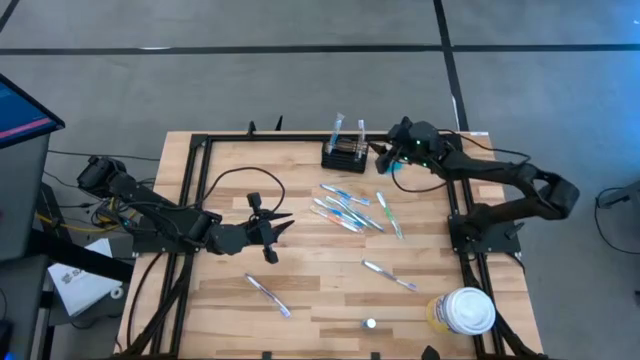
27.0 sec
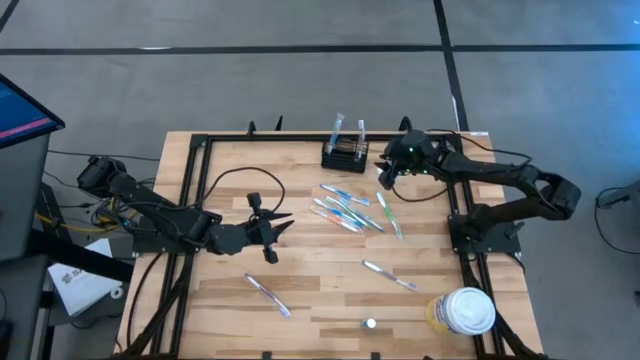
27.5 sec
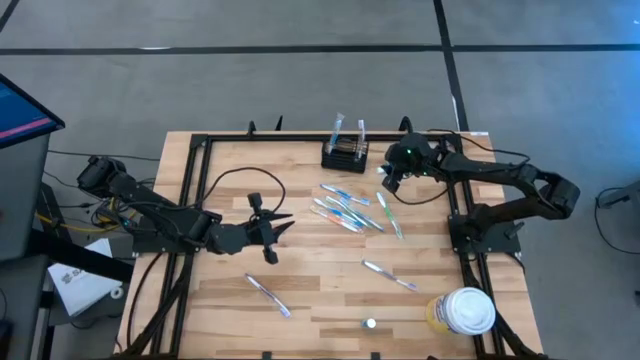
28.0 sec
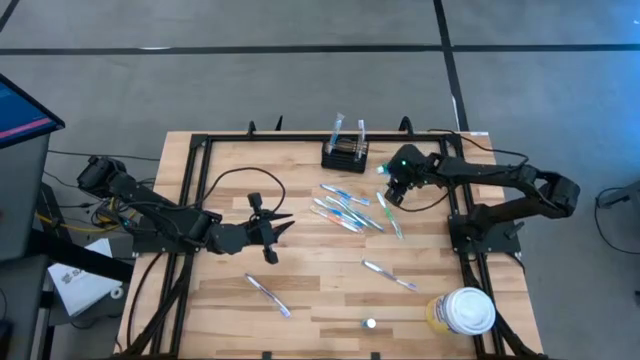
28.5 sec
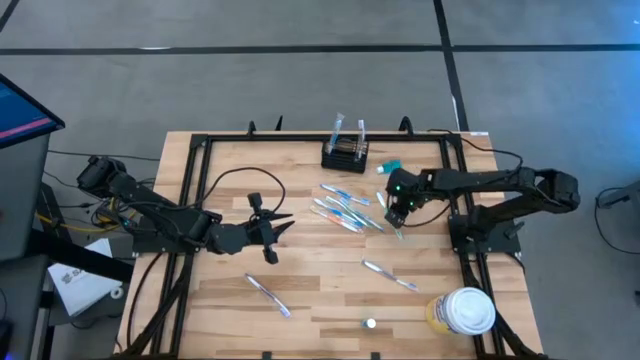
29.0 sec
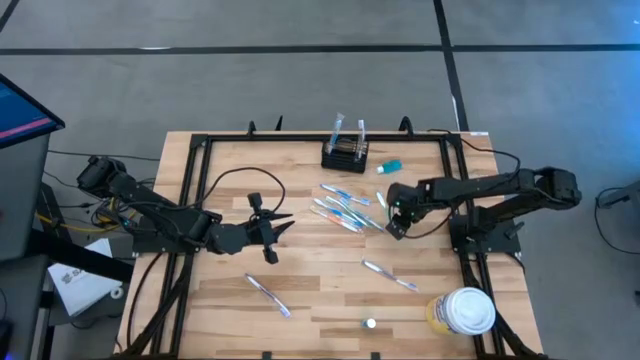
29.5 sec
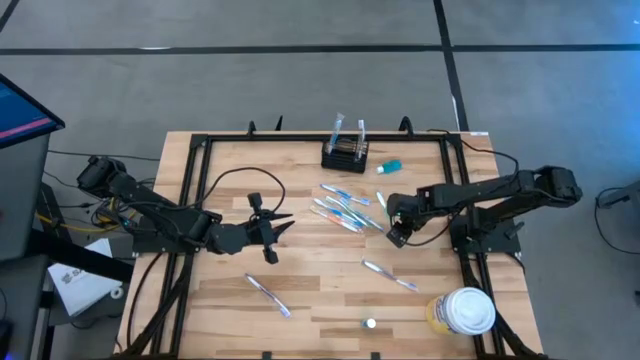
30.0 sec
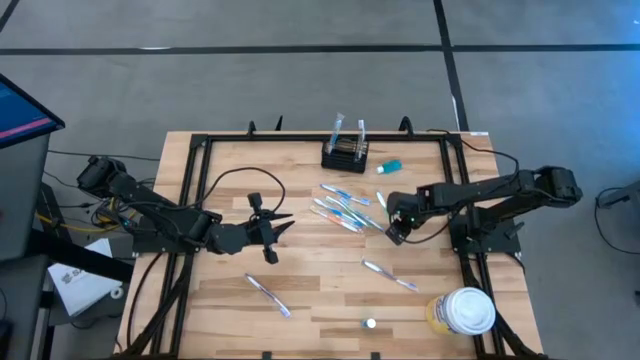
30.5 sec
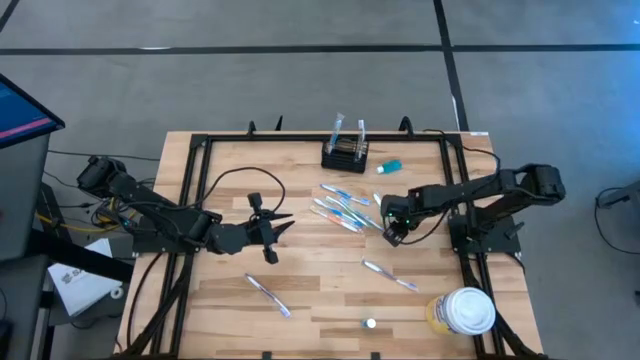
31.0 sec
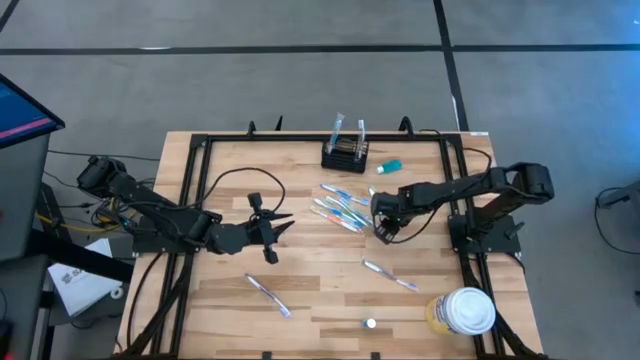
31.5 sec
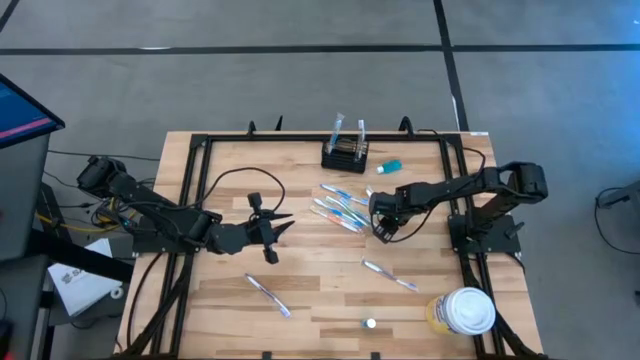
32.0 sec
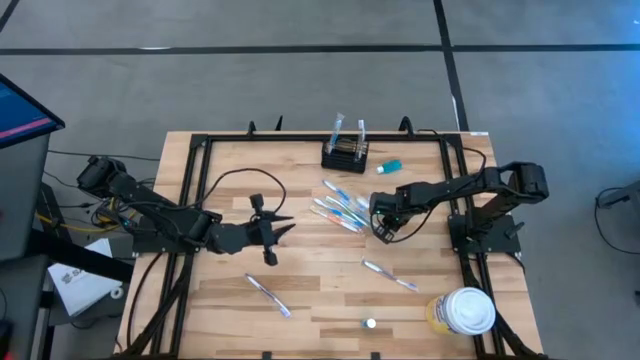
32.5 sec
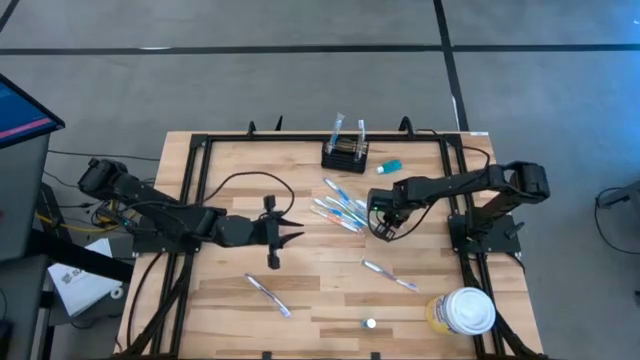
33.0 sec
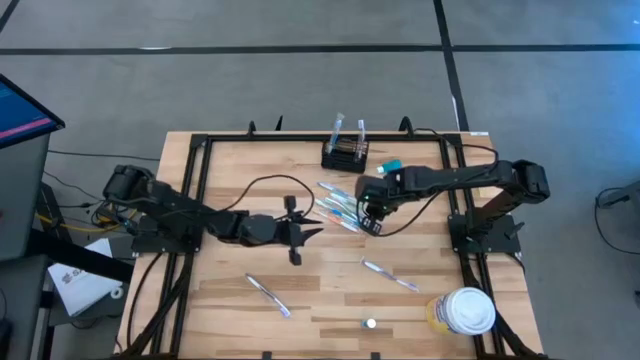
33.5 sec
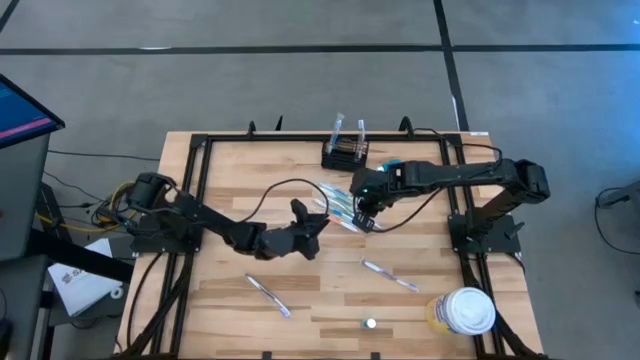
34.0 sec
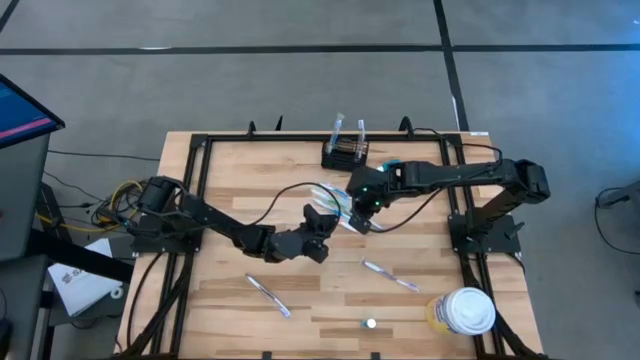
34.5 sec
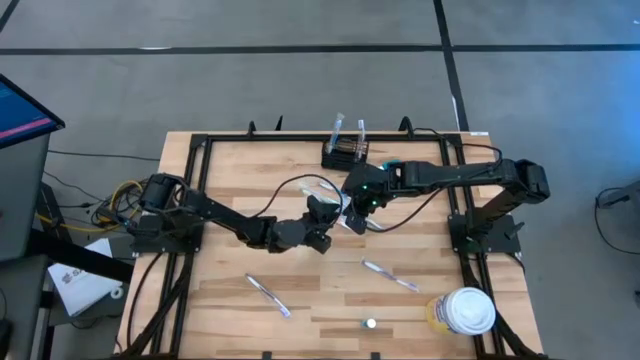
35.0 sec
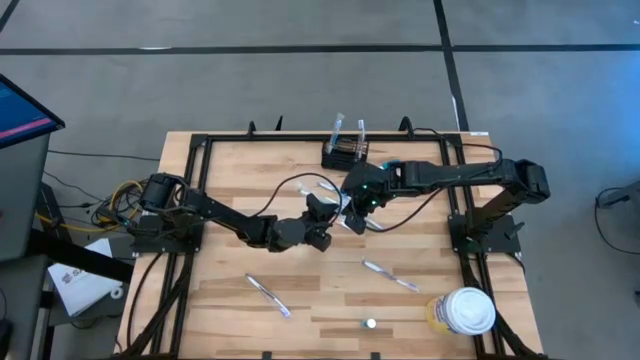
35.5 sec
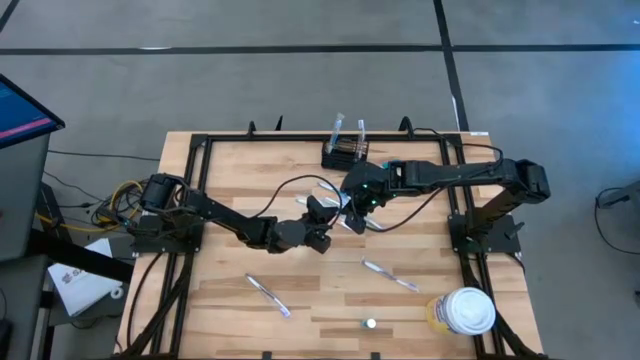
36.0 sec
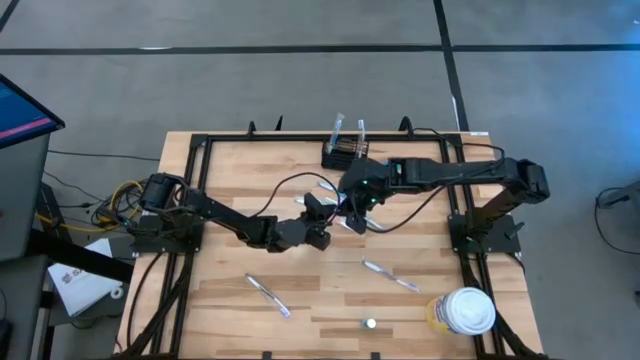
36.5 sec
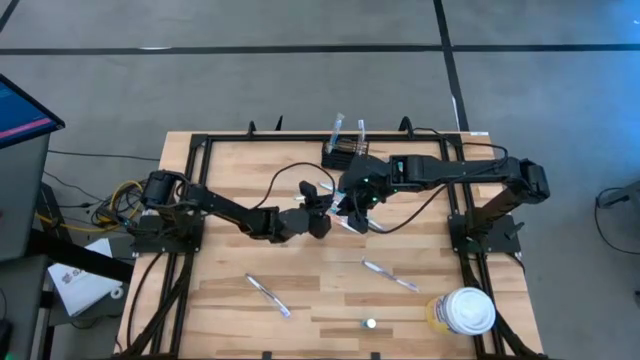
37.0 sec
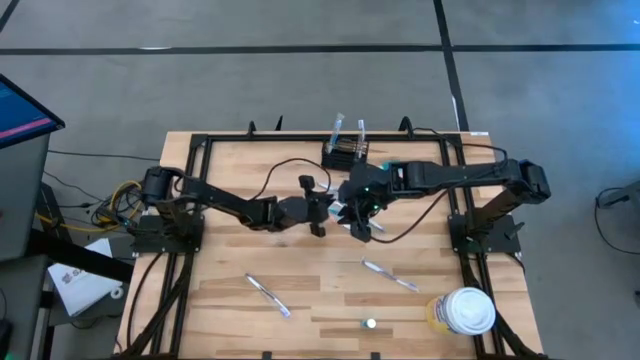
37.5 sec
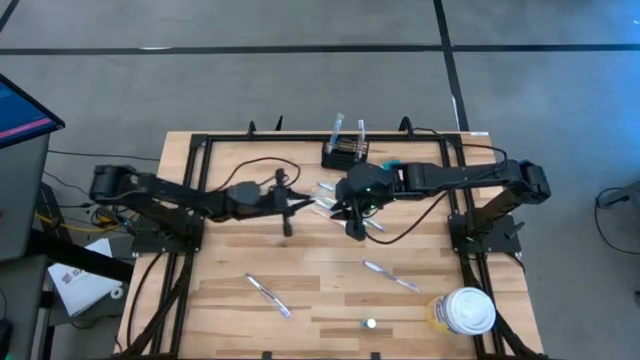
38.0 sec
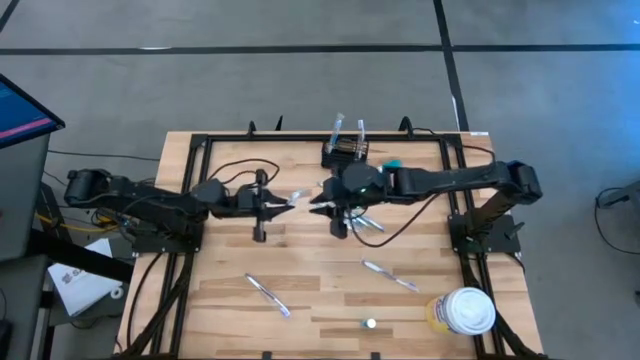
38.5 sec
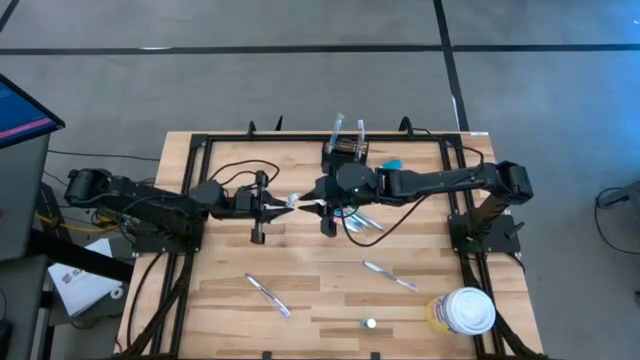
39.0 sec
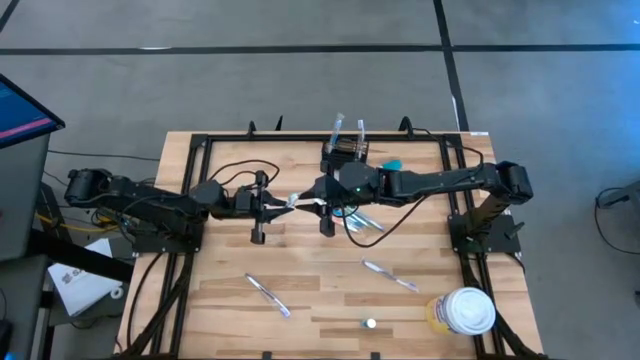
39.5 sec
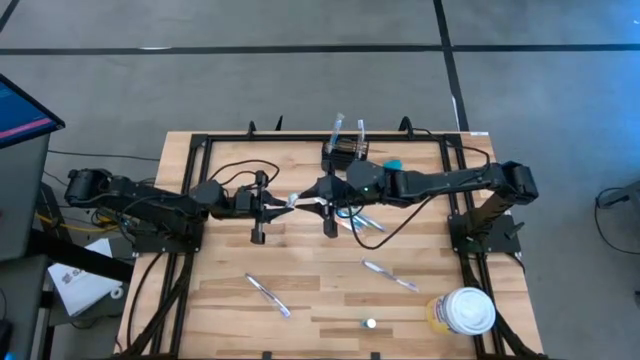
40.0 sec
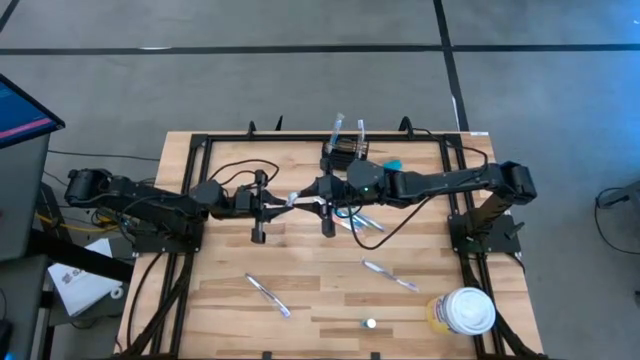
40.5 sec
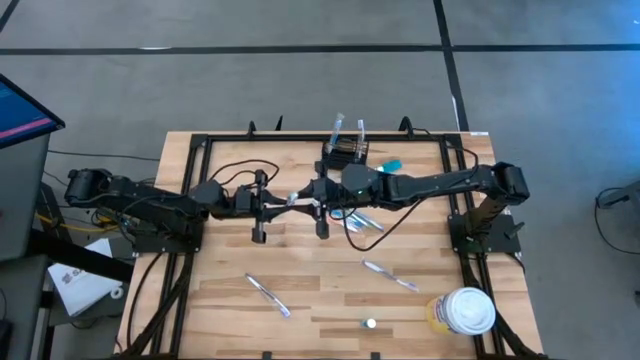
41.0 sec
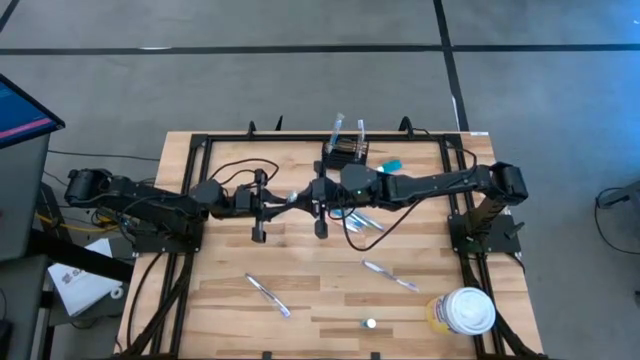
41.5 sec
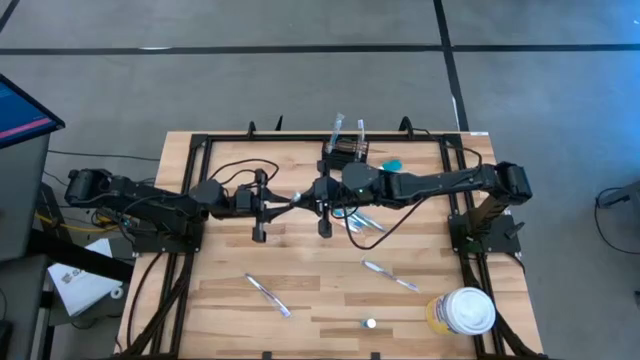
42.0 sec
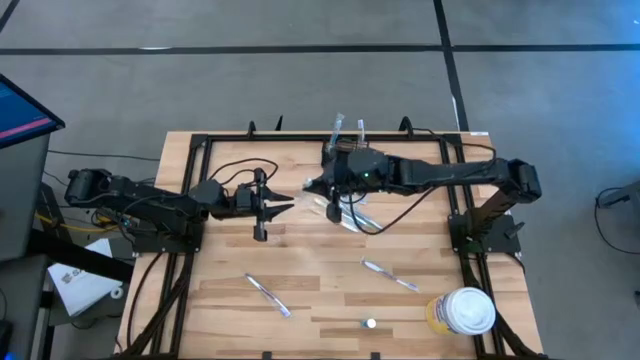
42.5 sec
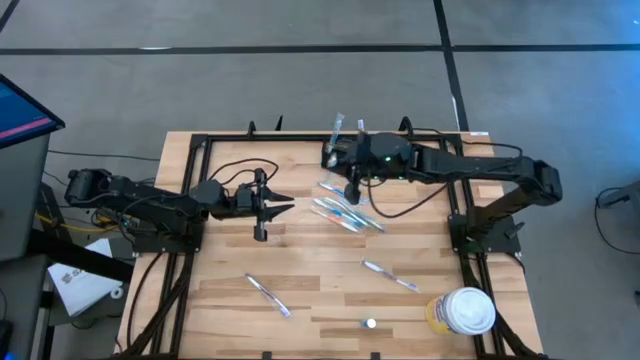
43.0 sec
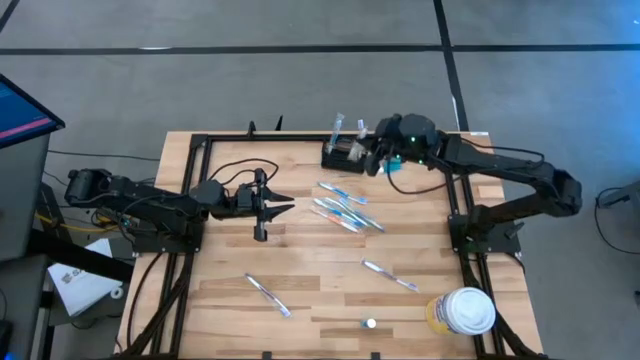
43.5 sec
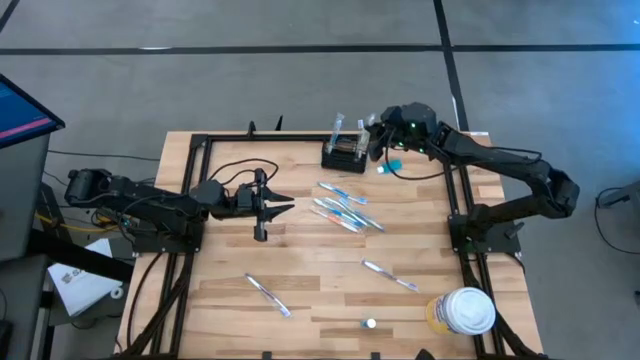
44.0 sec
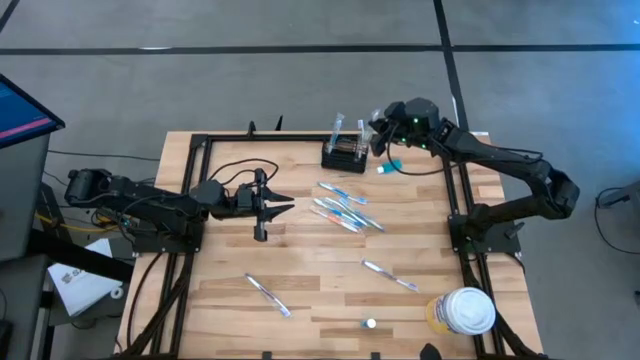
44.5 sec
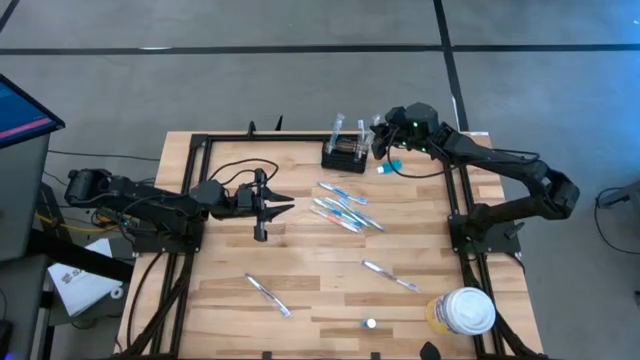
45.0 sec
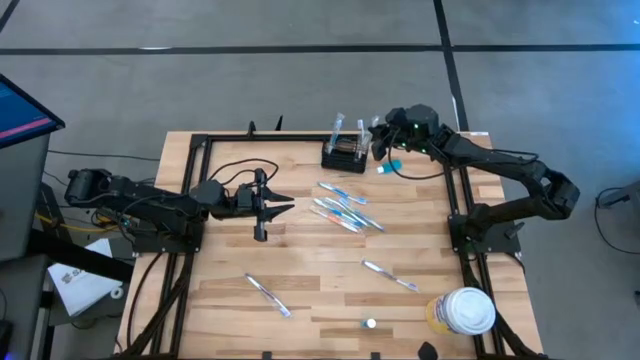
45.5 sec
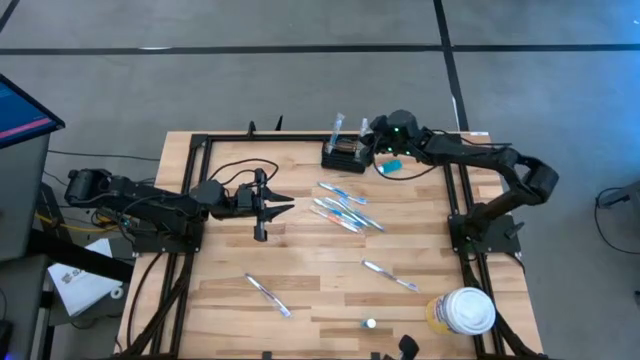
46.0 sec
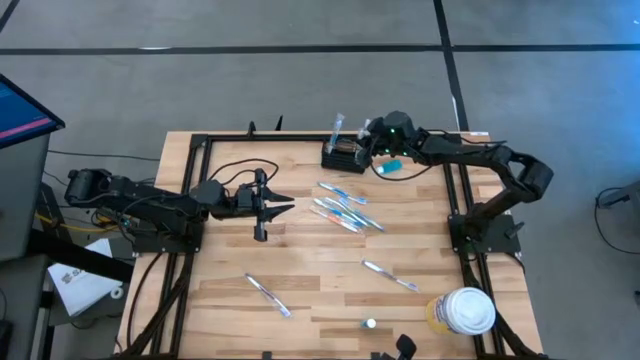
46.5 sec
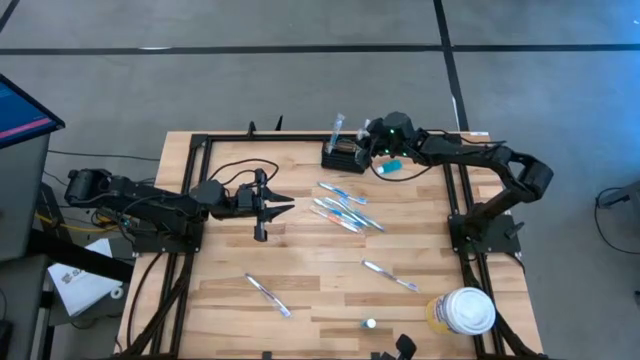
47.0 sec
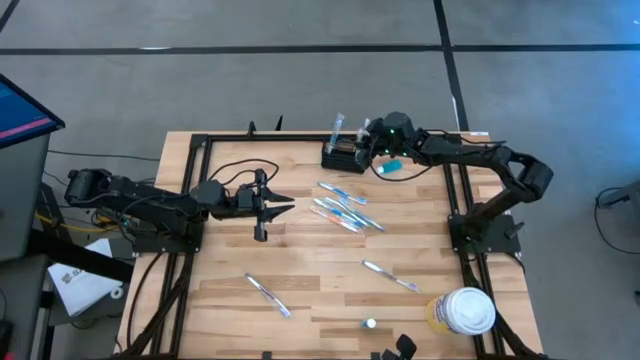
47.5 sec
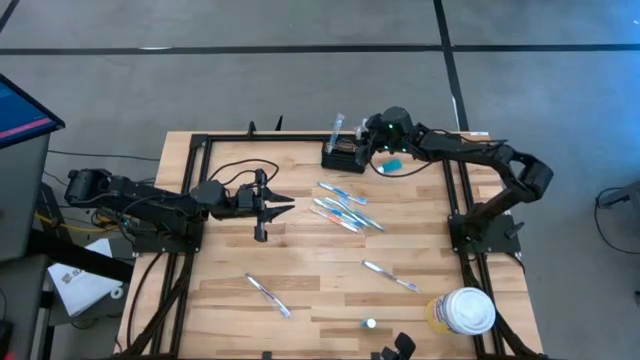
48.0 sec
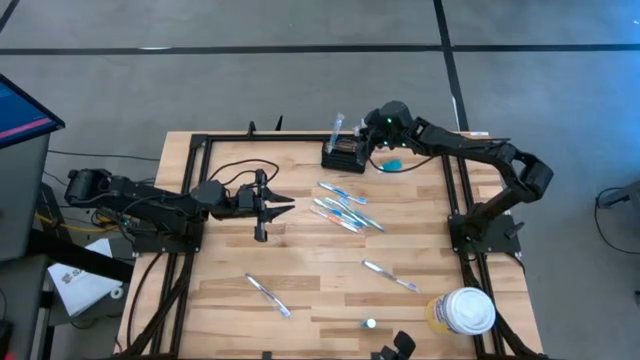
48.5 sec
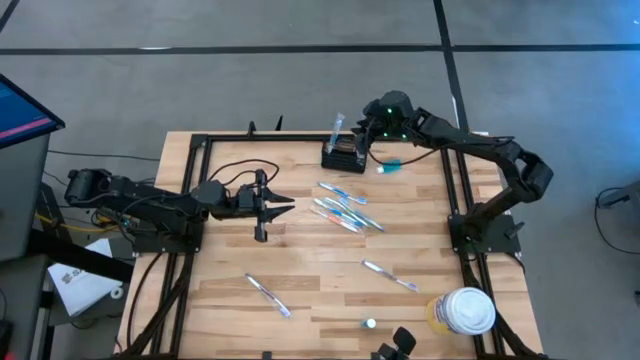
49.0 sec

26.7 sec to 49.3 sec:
Task: Pick & Place toothbrushing station
Put the right green toothbrush into the mesh organizer
